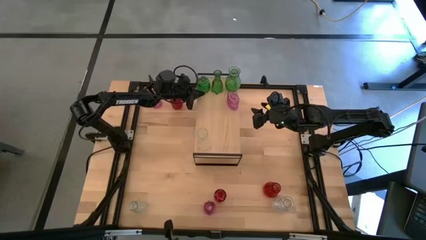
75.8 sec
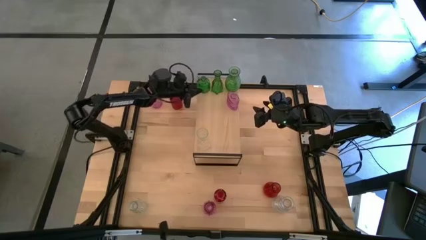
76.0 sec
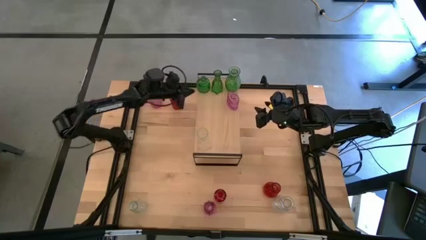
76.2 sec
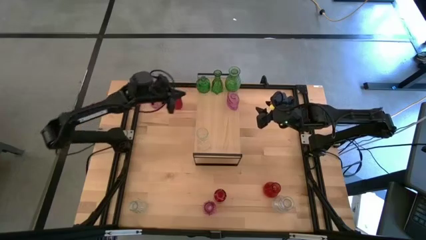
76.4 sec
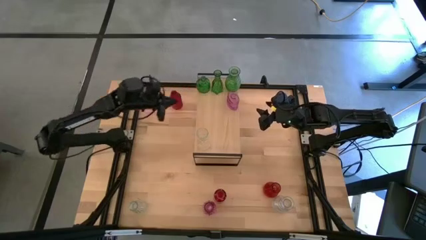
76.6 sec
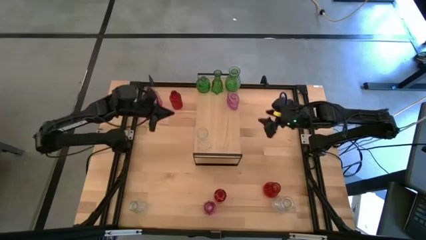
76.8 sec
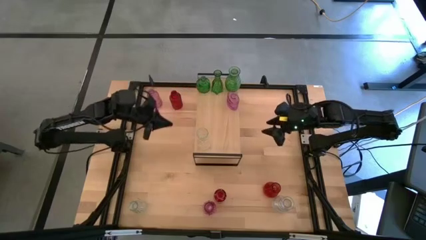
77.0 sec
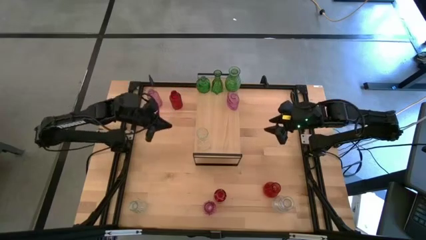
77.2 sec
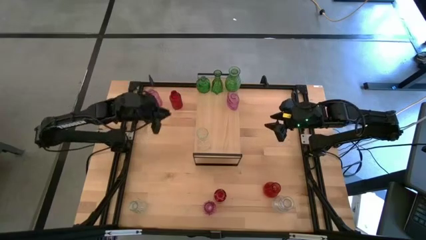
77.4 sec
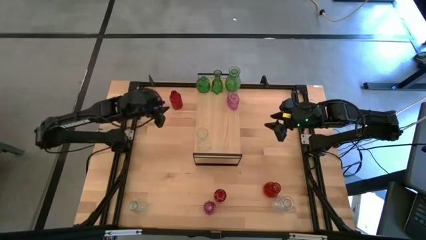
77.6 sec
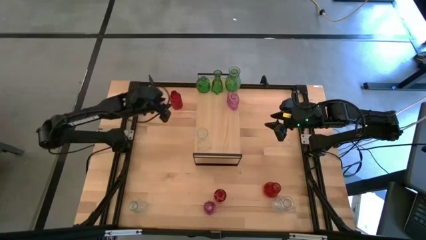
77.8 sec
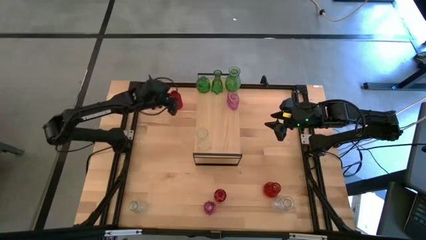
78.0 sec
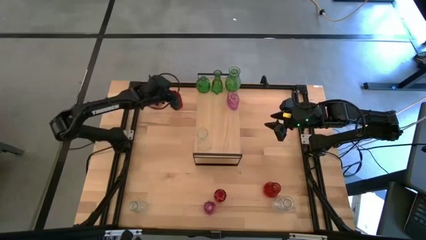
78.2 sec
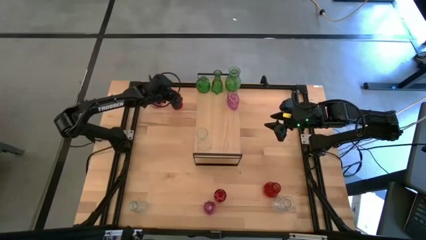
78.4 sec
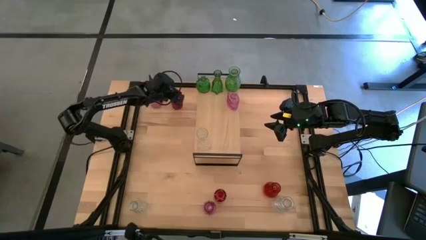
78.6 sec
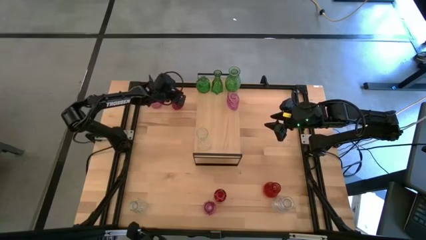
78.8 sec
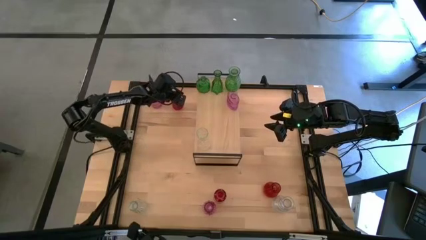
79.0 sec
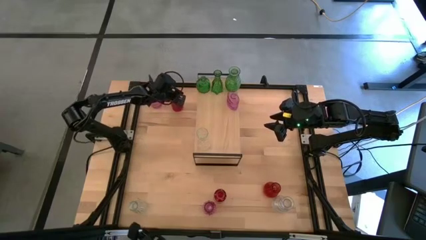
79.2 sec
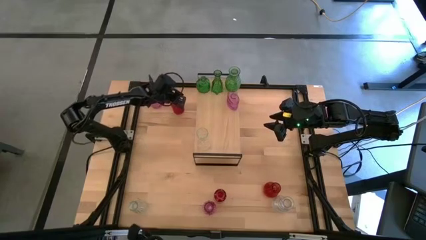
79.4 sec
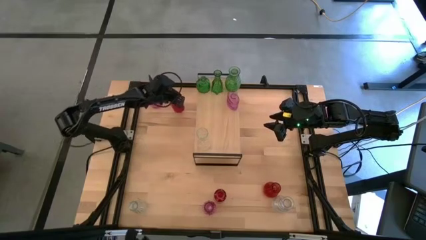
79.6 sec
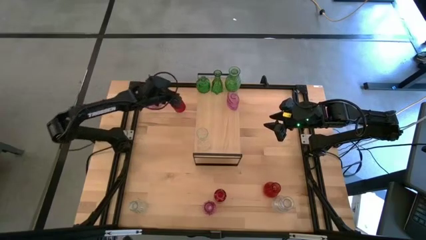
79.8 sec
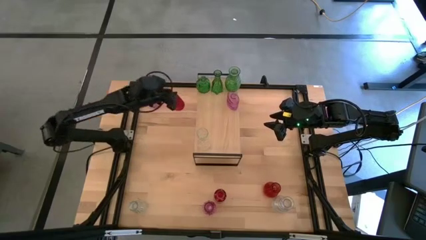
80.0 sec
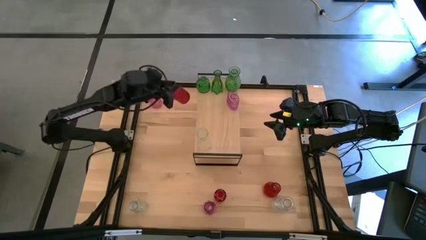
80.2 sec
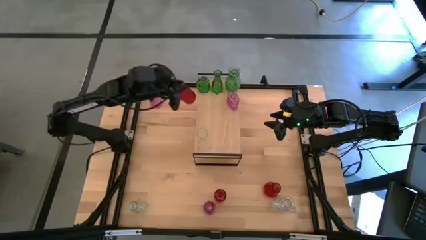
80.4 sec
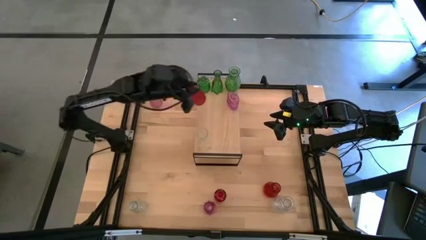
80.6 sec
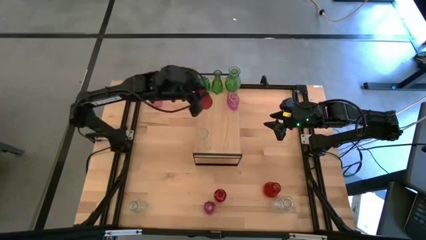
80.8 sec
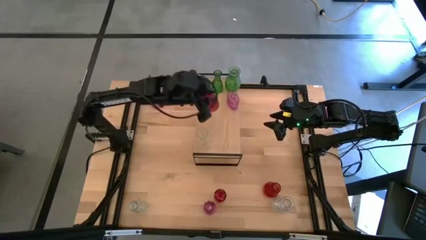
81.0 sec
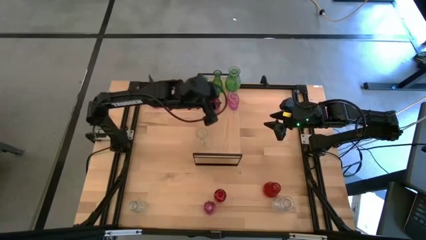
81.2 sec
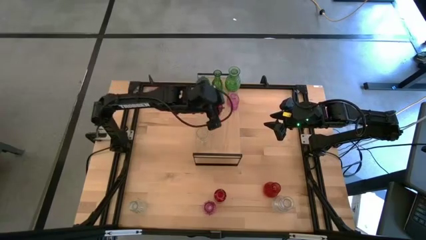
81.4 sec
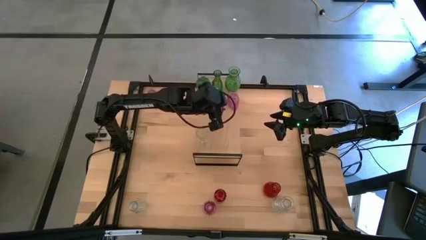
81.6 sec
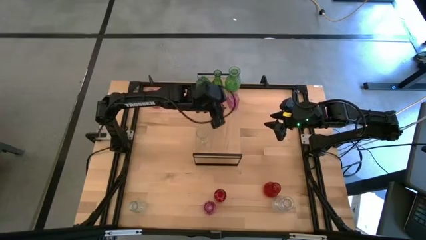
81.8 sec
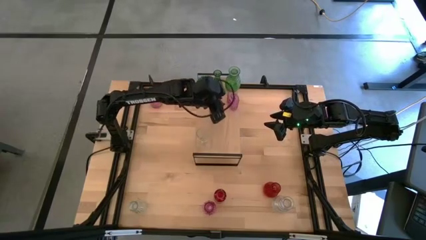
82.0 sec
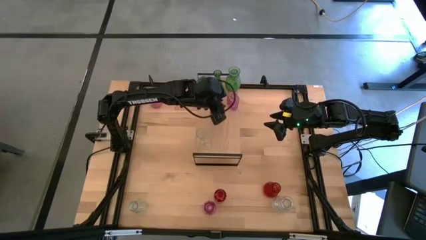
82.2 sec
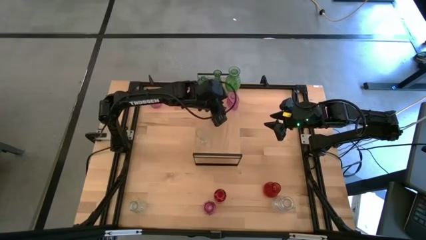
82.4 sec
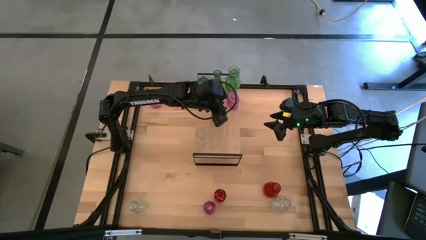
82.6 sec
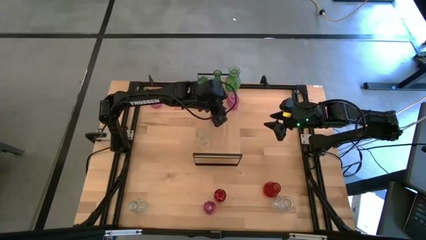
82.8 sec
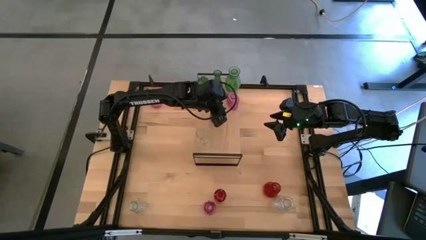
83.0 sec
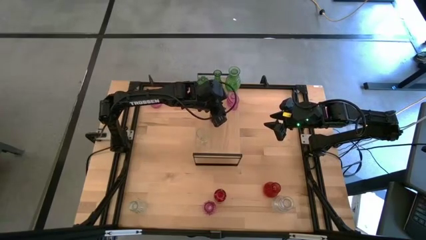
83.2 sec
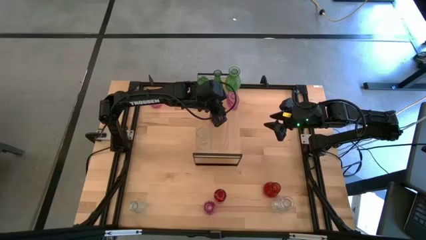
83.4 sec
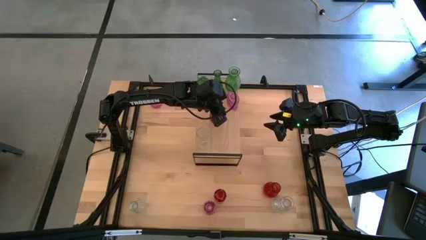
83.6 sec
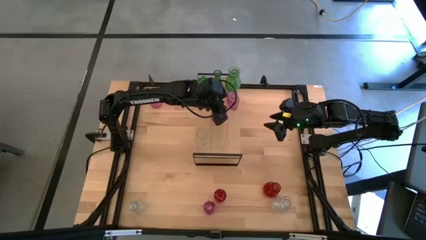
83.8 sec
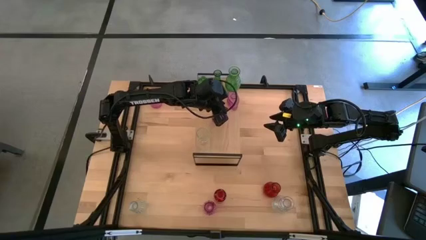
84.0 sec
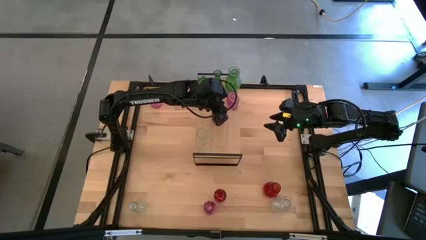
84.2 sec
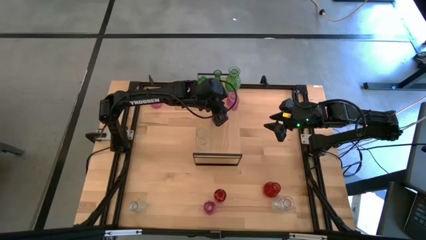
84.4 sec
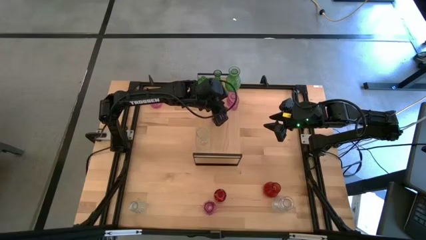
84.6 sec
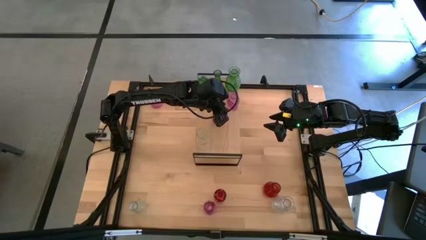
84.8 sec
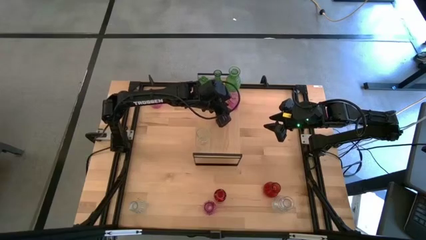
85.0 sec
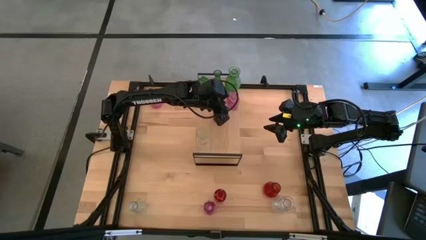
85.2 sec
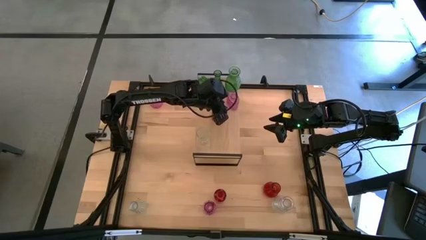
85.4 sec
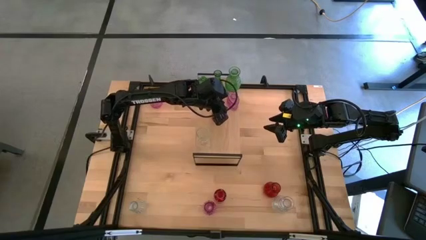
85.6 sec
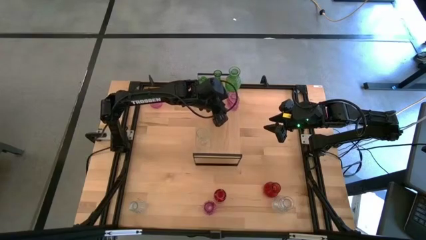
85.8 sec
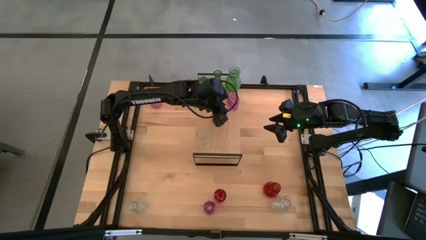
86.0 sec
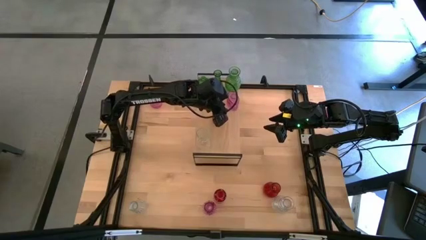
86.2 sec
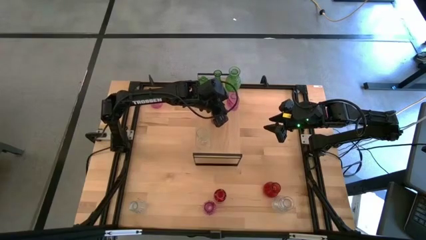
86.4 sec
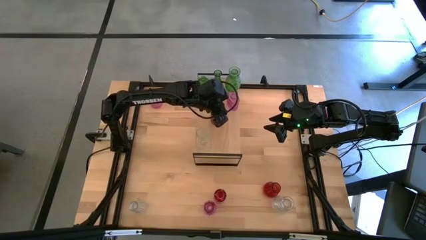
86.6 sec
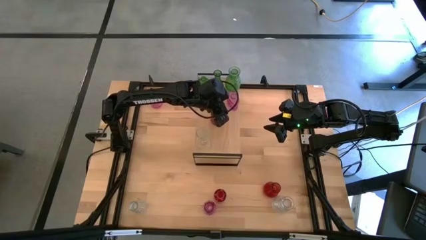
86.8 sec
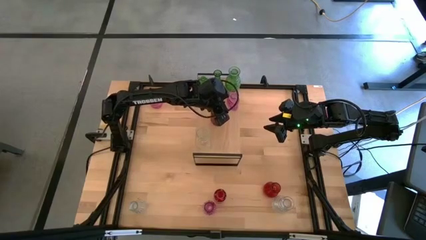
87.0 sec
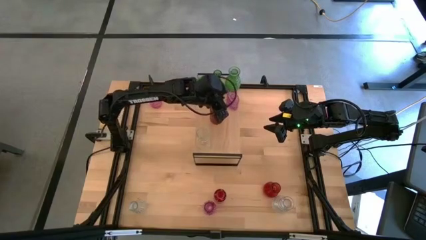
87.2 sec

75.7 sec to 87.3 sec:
Task: sort vases onto shelf
Put the top red vase on the shelf

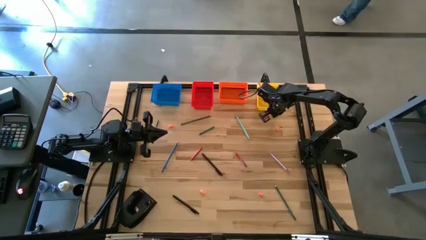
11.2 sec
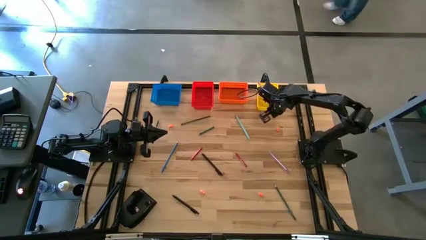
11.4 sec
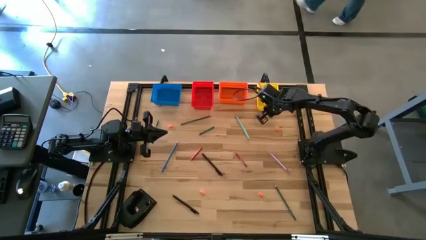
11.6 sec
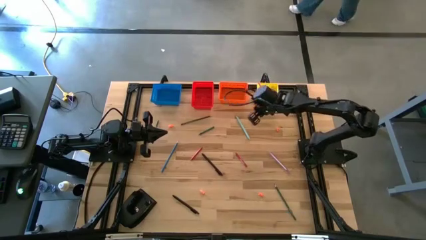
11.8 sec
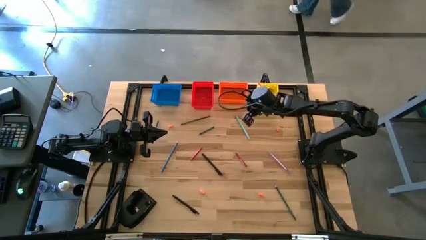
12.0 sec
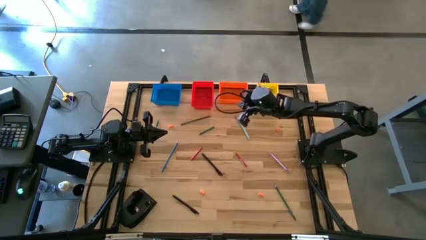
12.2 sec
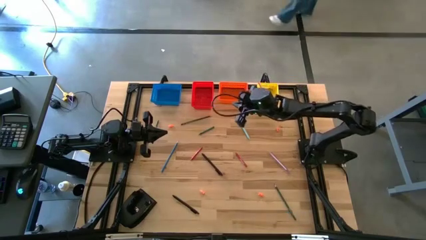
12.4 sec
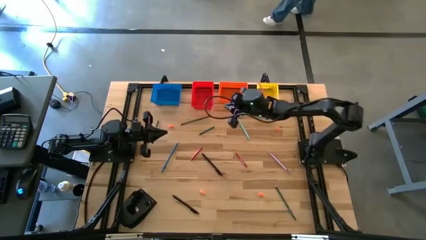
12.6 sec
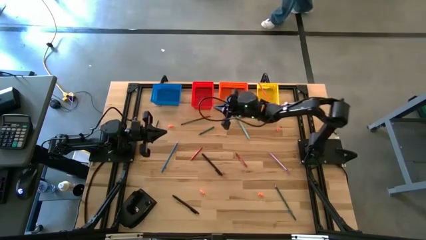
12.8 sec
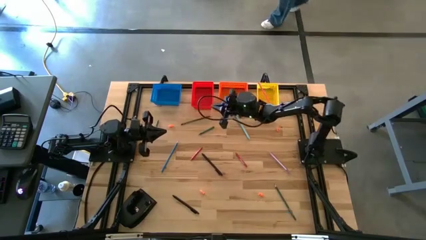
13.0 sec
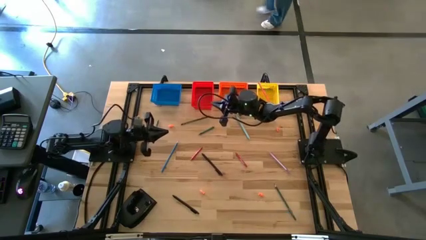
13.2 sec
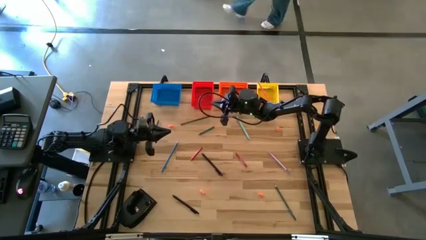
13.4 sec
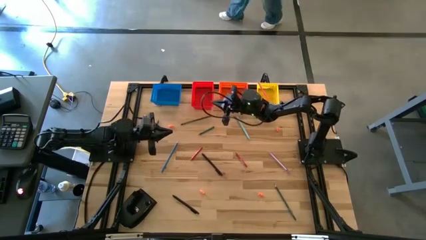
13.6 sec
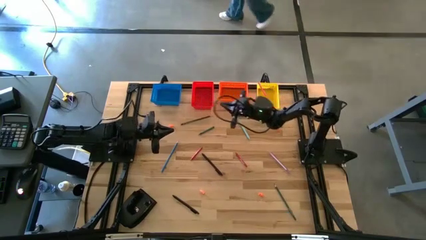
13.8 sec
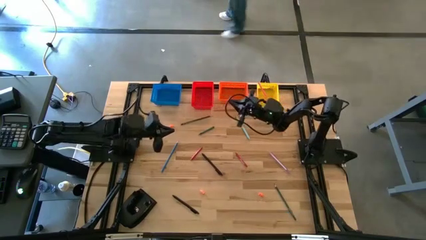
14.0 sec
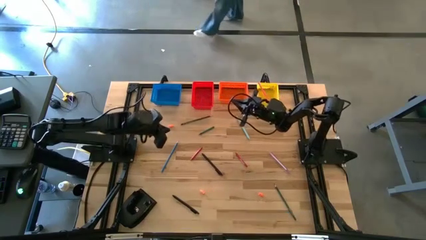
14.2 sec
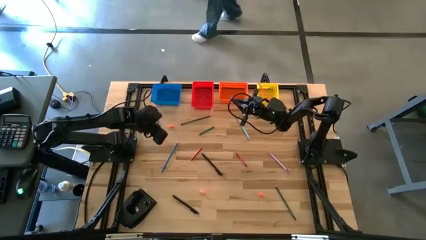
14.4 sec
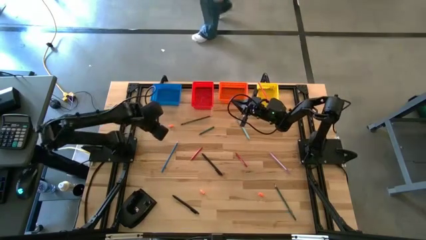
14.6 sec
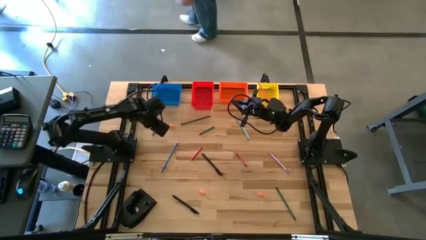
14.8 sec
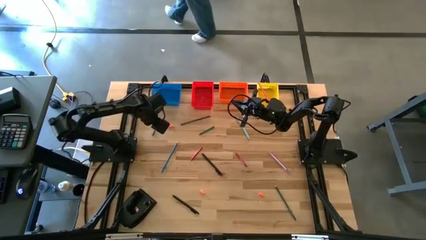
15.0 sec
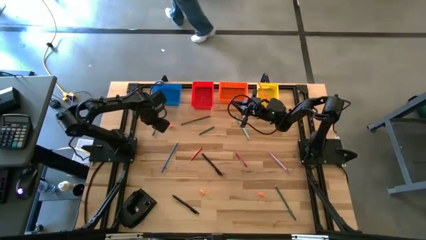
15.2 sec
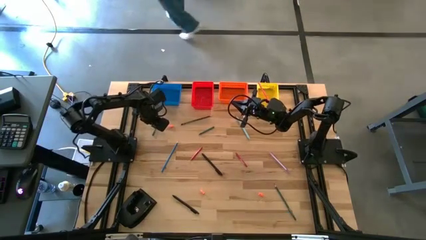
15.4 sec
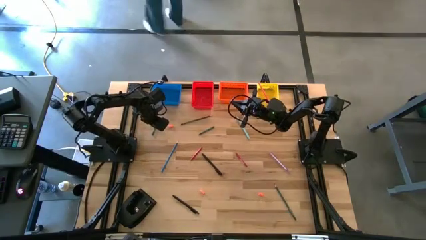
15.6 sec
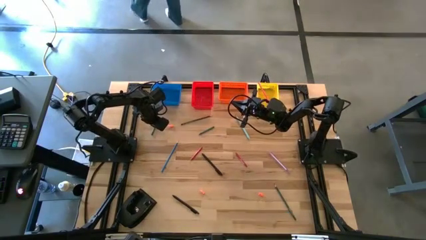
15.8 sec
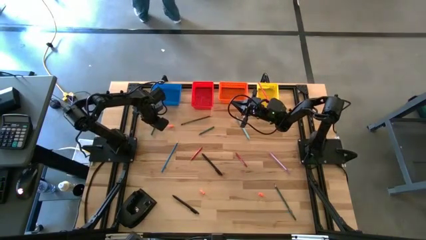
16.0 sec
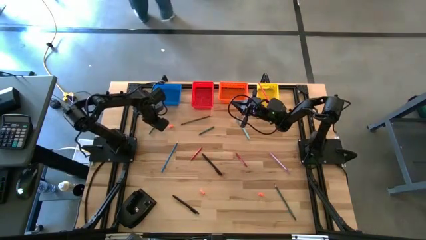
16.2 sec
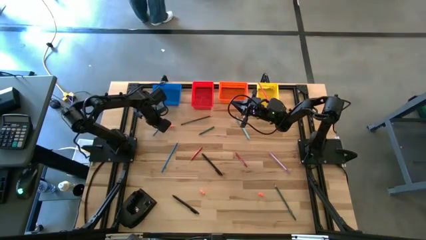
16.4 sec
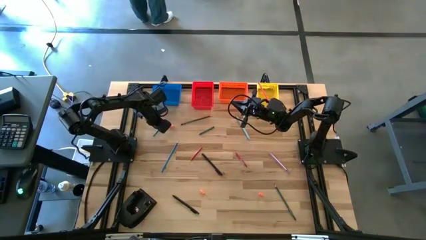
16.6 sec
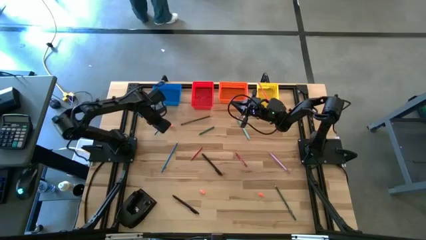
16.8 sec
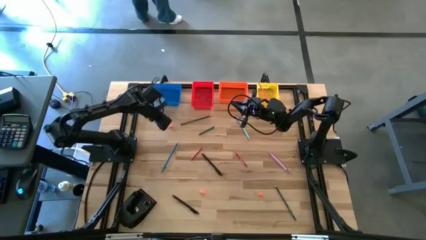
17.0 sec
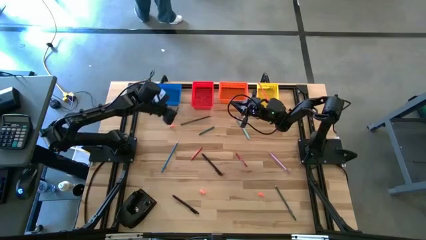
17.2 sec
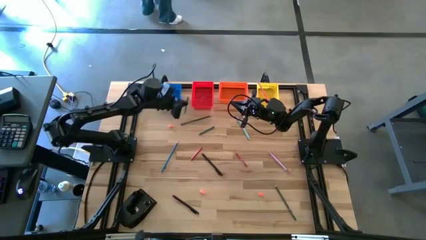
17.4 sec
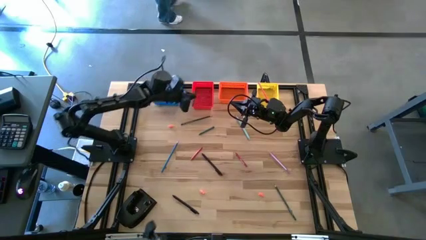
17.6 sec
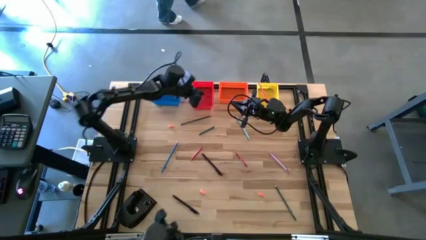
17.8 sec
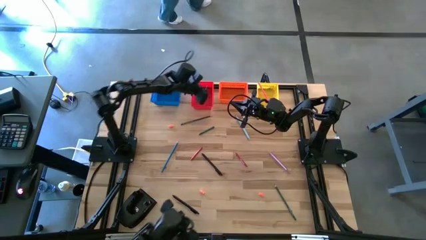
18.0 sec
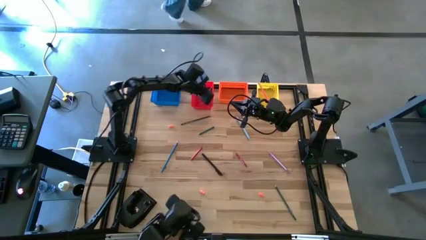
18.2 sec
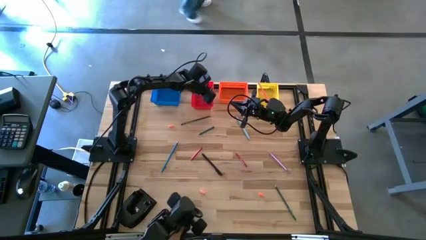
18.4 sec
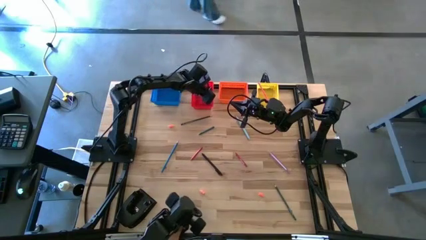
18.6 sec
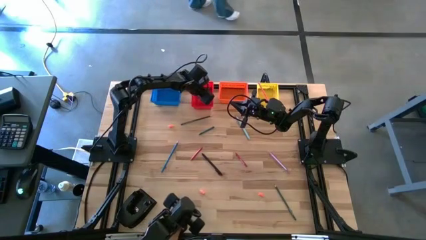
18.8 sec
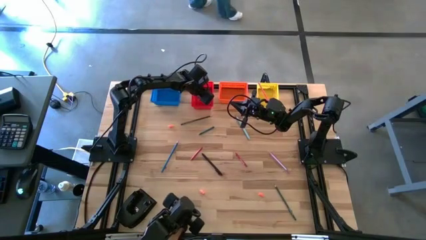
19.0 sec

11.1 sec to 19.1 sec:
Task: Sort crayons/erasers/pens/pencils in bins
Put the green crayon into the red bin
